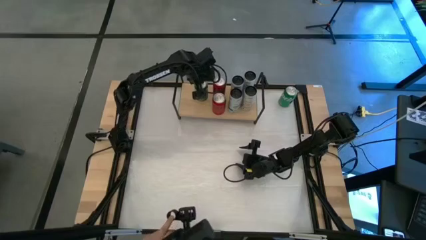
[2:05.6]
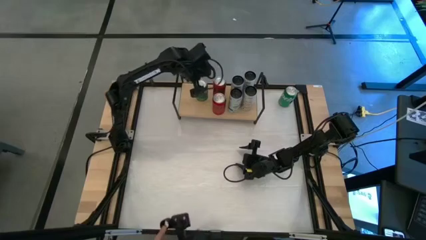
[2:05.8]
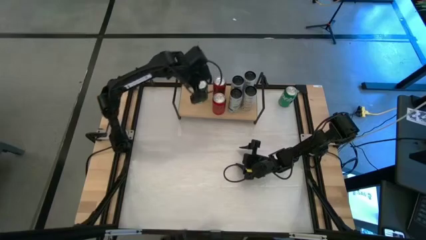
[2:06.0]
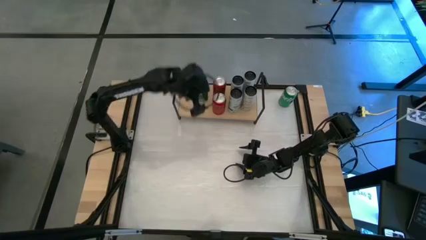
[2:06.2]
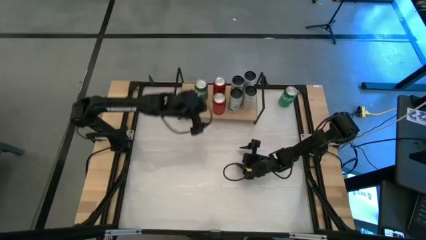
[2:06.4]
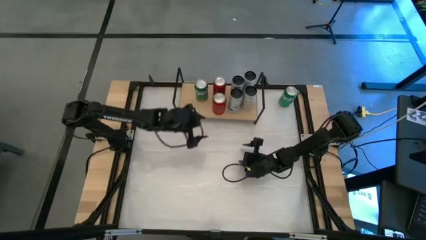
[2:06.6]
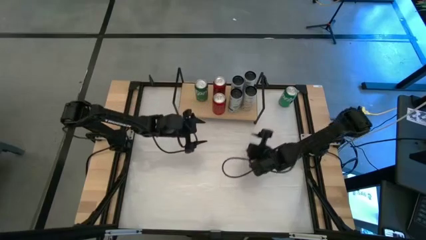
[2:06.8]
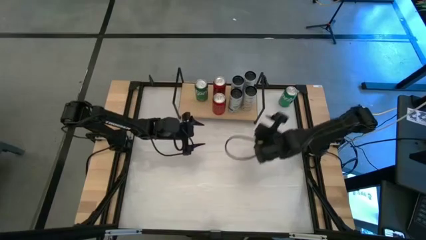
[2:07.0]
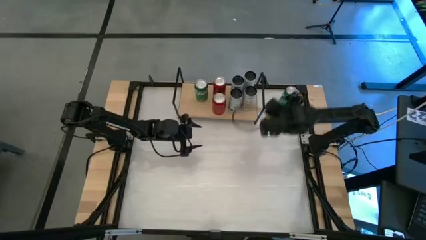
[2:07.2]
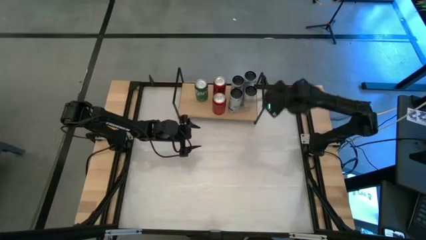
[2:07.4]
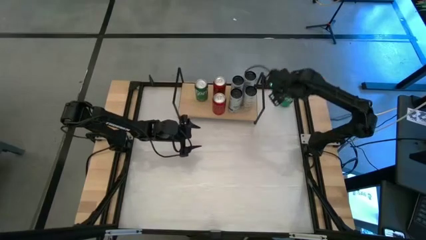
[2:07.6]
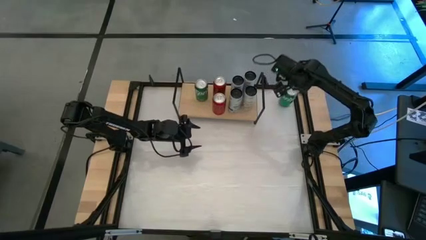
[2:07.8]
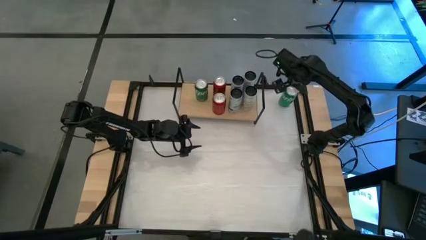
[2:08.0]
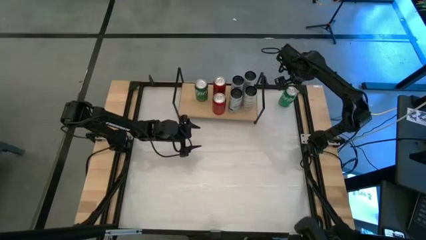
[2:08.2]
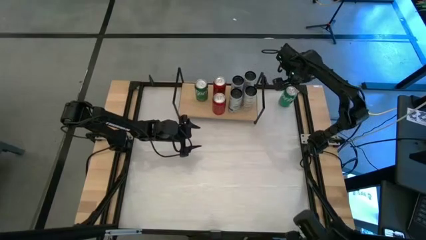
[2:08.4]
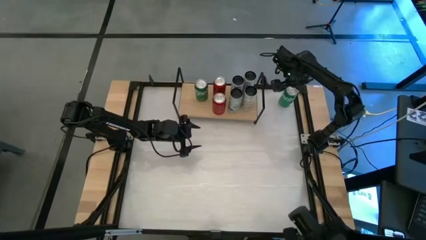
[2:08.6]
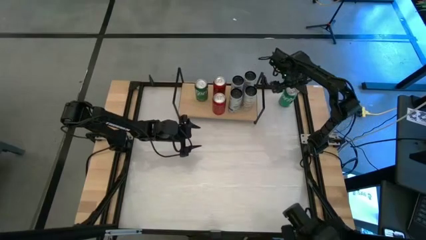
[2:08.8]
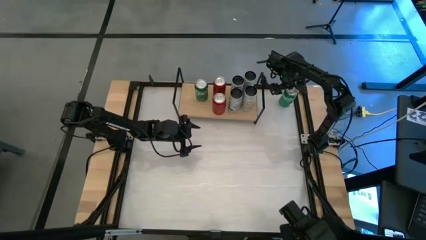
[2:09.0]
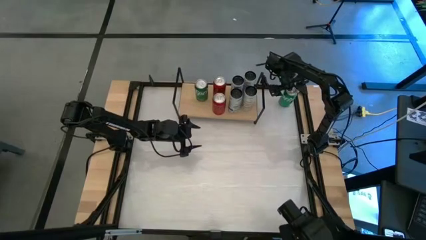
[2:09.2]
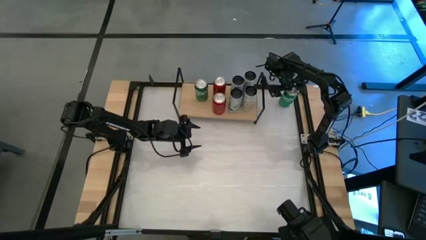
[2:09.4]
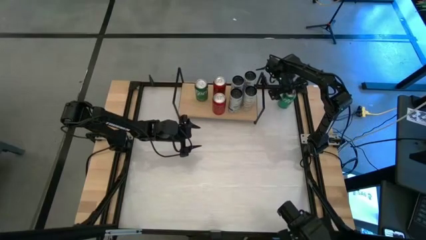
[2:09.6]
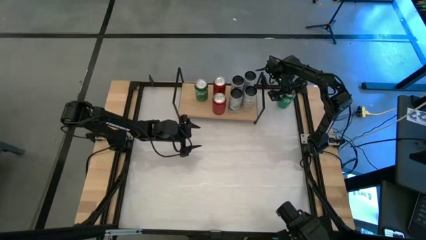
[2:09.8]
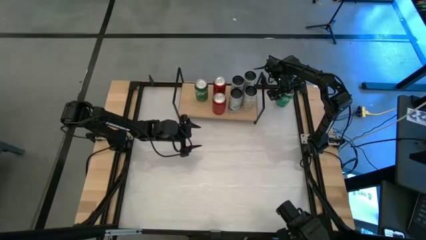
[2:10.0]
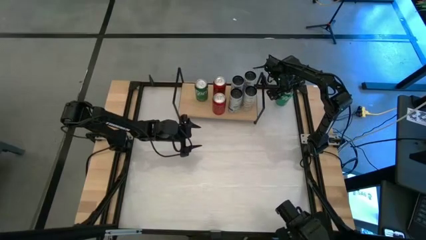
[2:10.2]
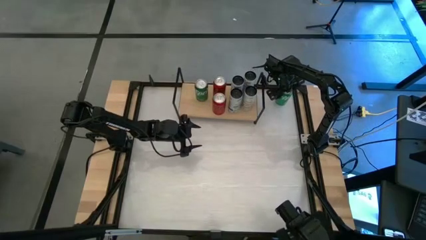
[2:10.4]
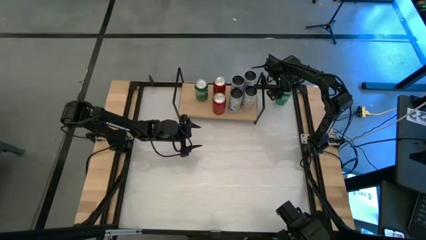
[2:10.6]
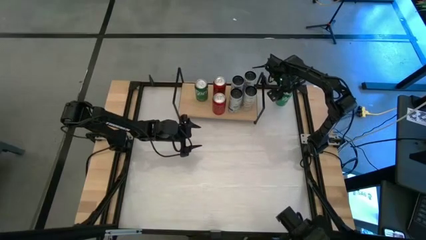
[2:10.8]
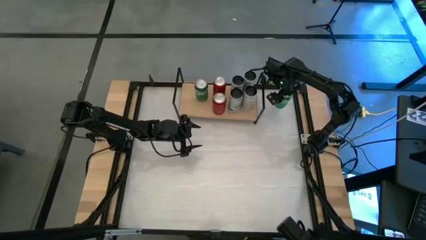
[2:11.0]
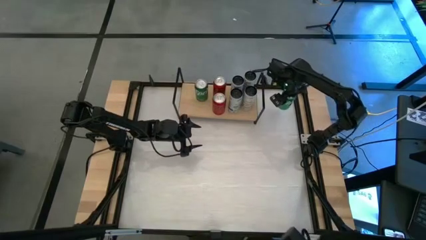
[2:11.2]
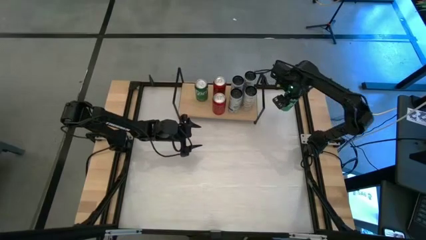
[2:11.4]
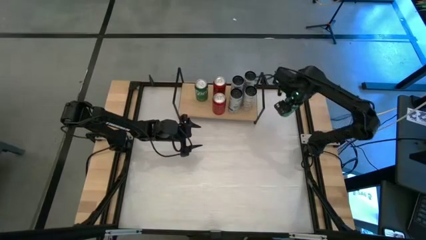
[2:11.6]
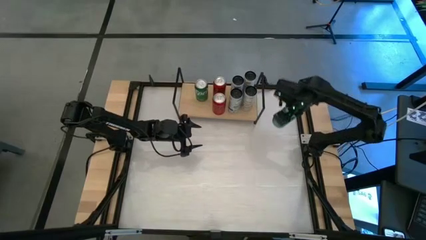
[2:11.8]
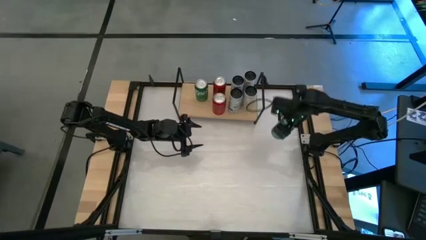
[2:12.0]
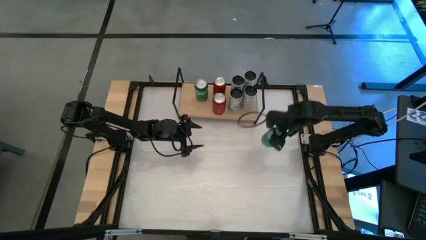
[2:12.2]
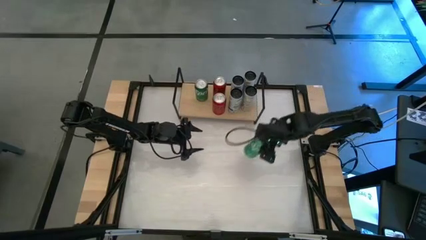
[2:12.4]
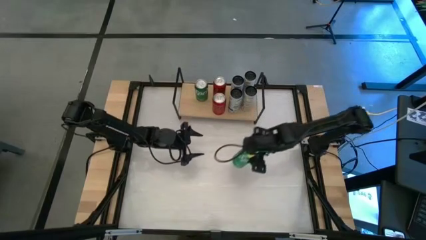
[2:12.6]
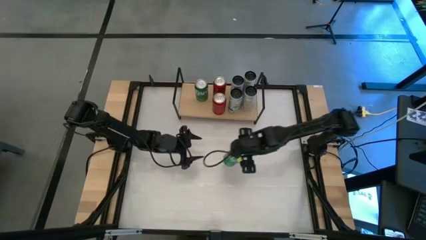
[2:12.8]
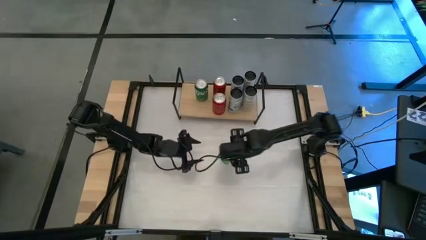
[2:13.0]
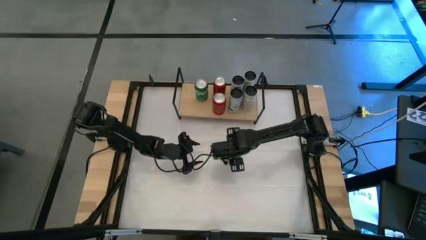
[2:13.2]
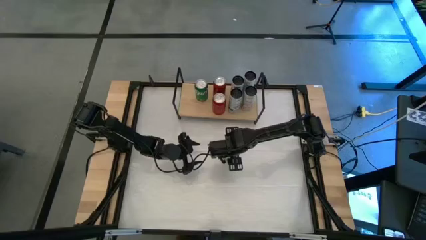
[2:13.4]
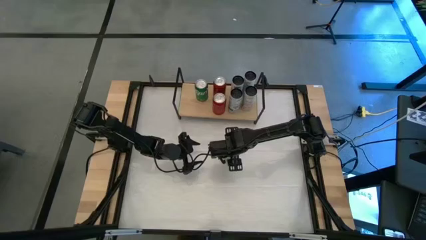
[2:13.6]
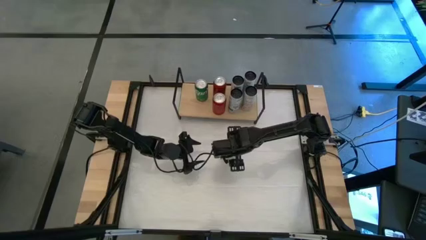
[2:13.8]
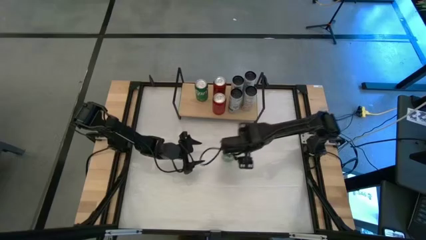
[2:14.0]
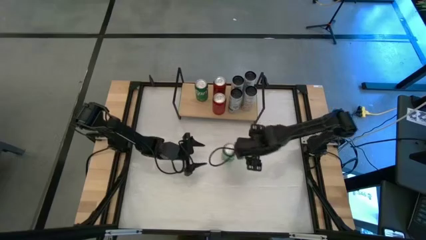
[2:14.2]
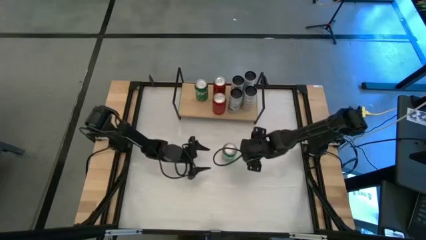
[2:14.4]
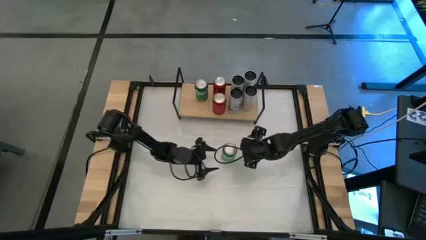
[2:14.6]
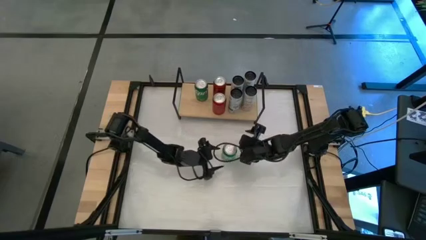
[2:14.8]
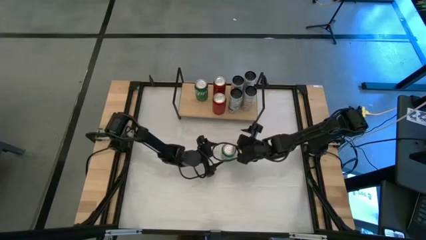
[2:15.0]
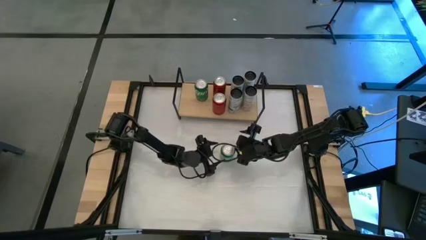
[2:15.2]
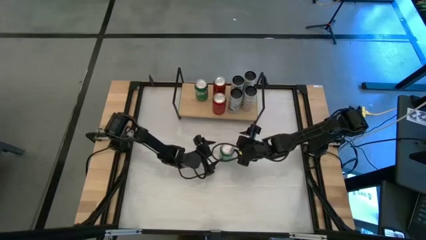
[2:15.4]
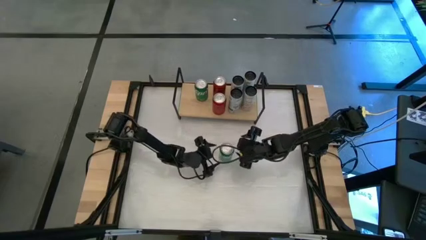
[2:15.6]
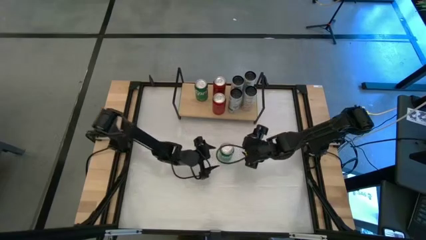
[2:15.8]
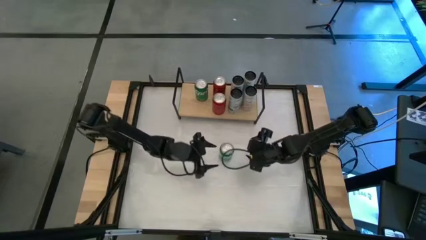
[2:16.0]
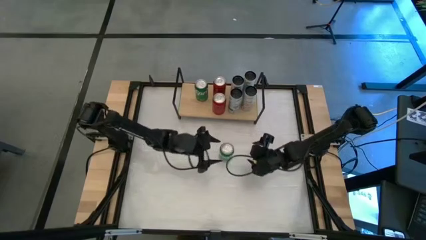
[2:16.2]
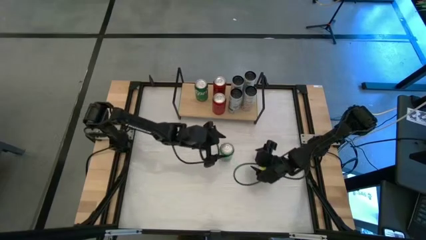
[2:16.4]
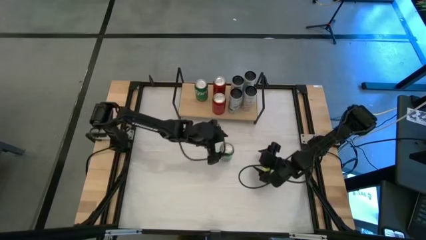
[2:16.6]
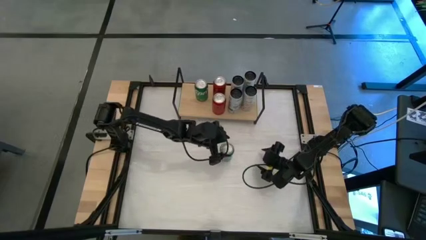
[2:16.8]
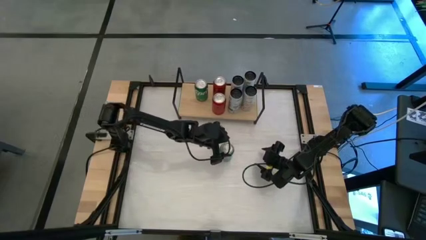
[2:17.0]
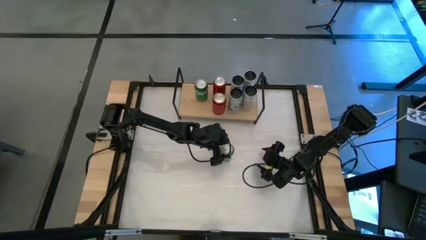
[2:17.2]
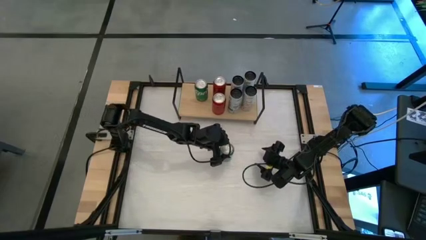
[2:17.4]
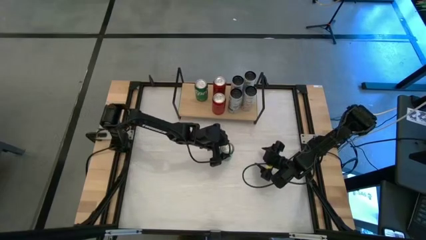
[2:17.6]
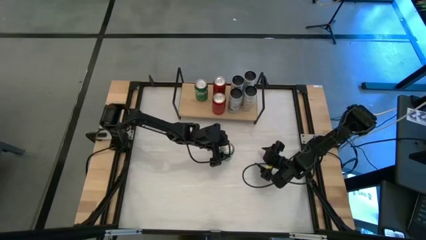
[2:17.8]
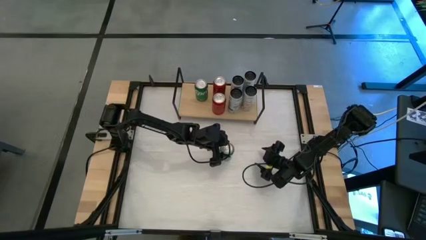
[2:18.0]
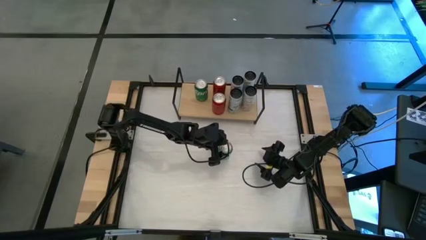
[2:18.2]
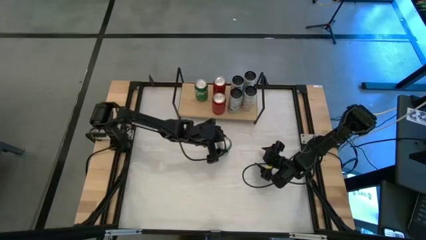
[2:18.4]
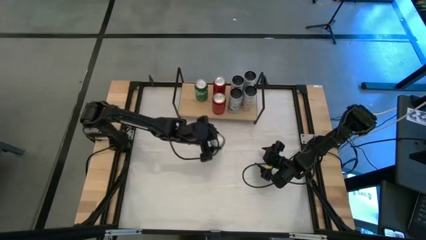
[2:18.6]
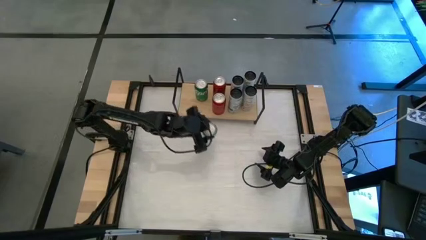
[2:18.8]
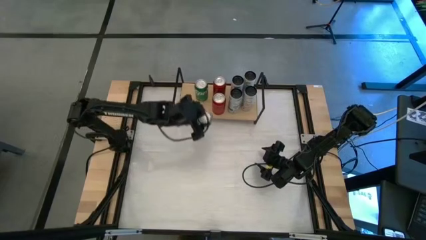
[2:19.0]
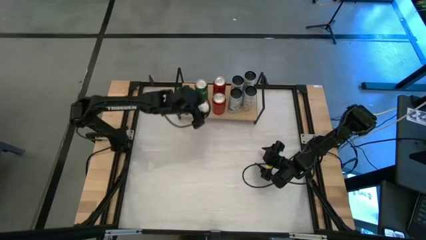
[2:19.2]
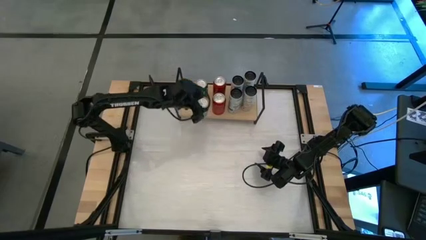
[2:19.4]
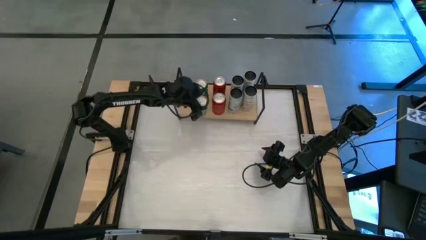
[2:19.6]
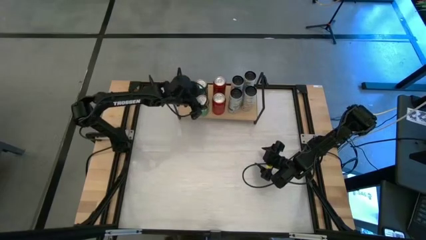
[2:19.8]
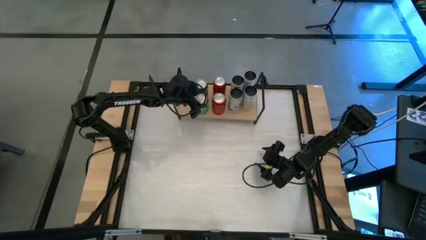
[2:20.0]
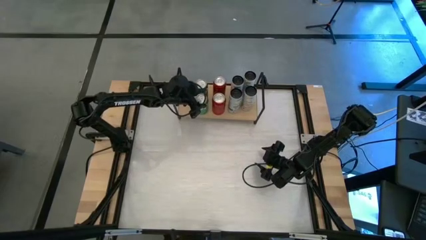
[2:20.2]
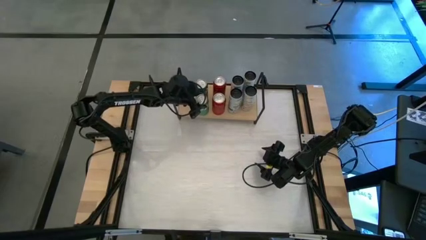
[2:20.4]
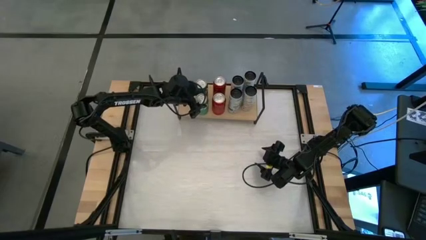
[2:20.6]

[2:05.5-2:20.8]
Task: Place canned beverage on shelf
Put the green soda can on the shelf aligned with the other green soda can
